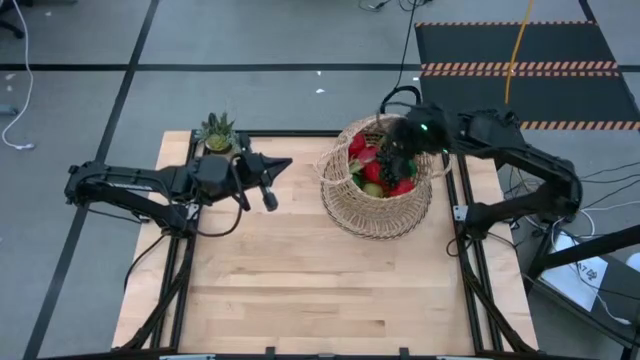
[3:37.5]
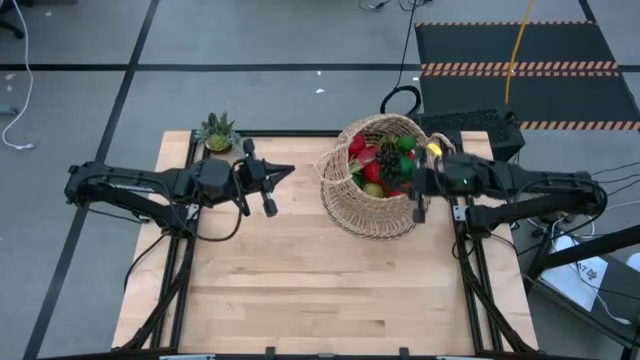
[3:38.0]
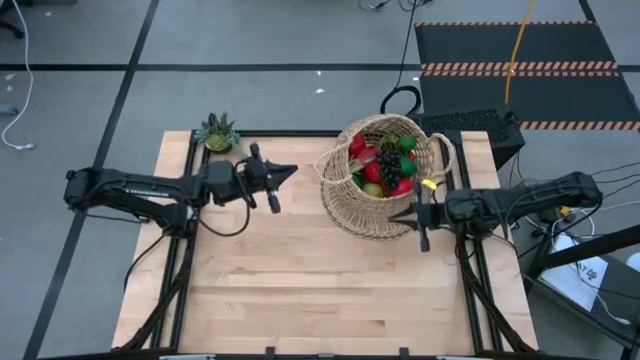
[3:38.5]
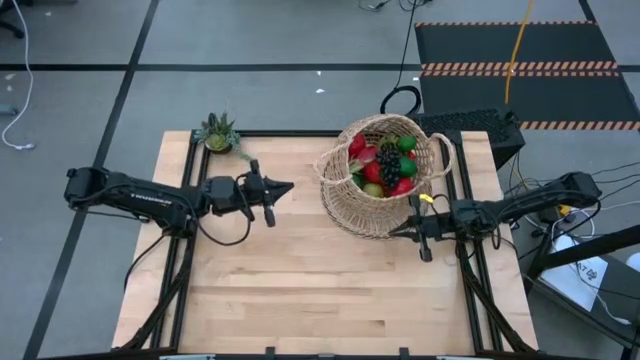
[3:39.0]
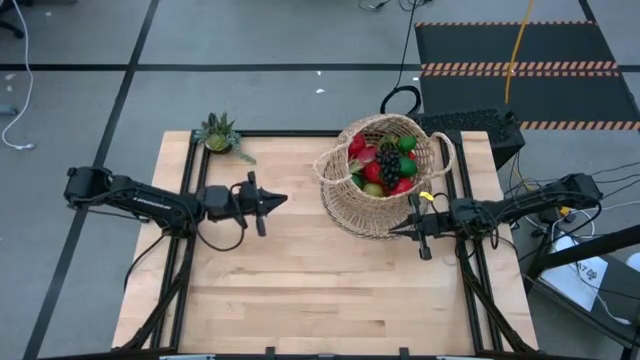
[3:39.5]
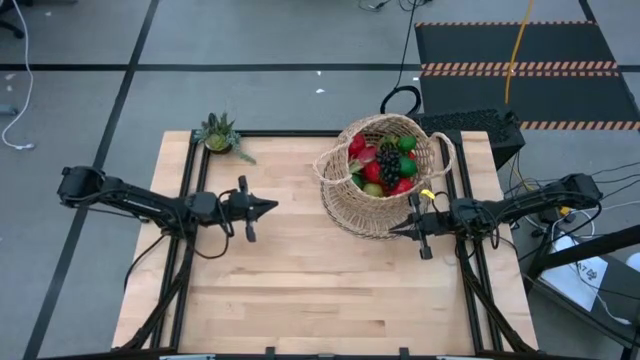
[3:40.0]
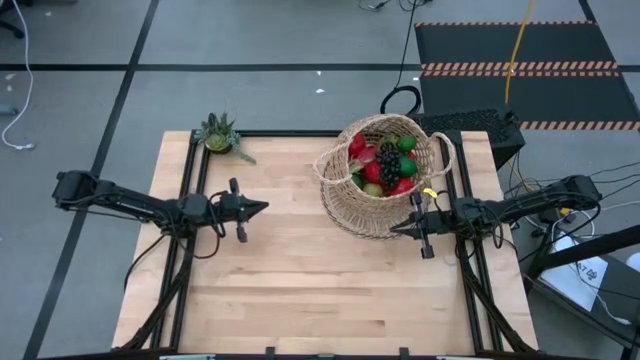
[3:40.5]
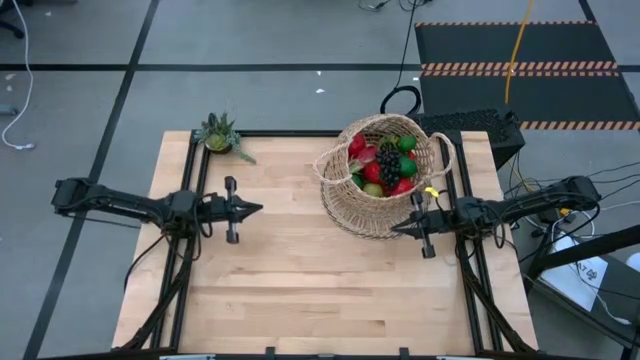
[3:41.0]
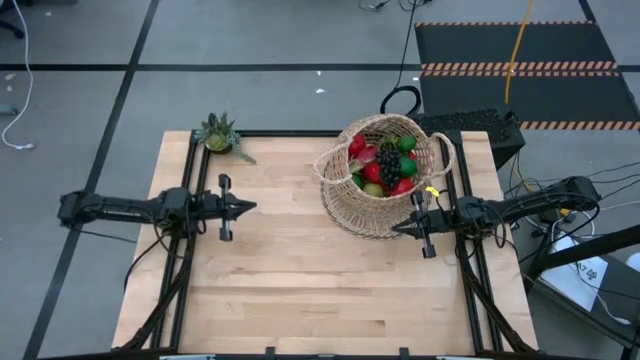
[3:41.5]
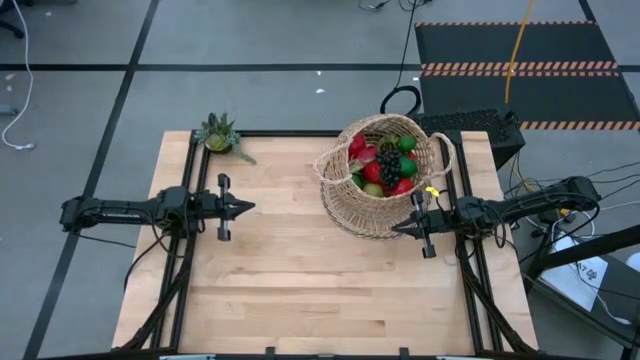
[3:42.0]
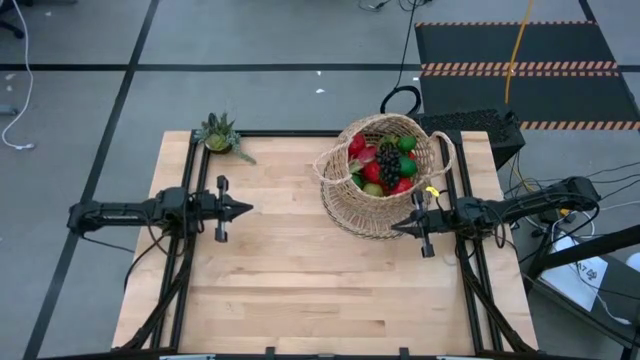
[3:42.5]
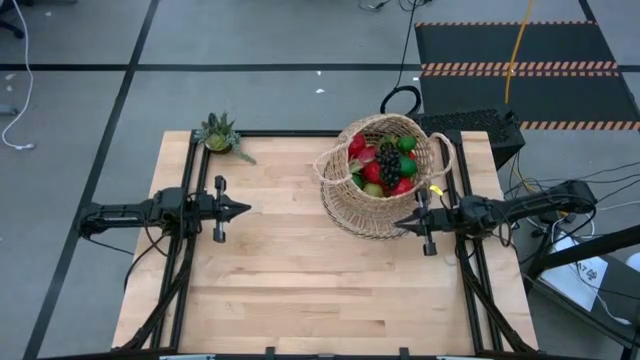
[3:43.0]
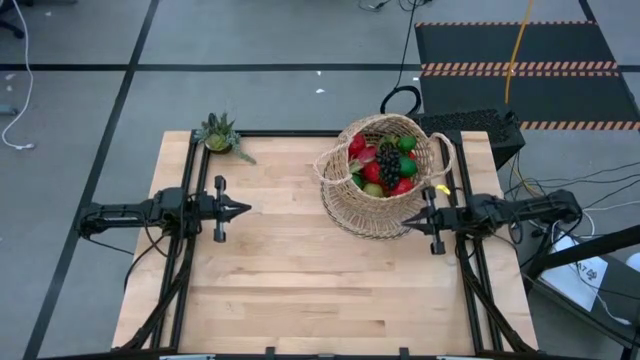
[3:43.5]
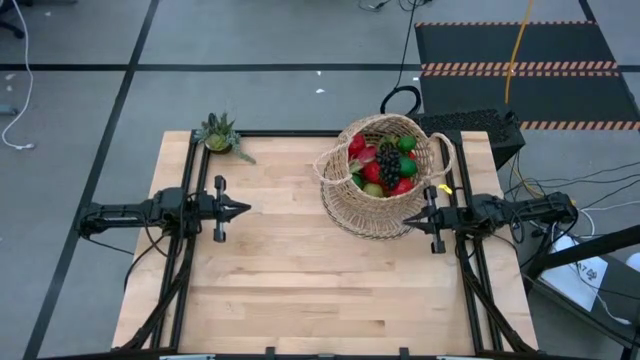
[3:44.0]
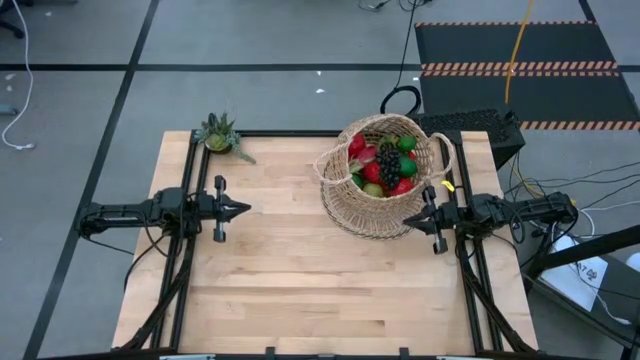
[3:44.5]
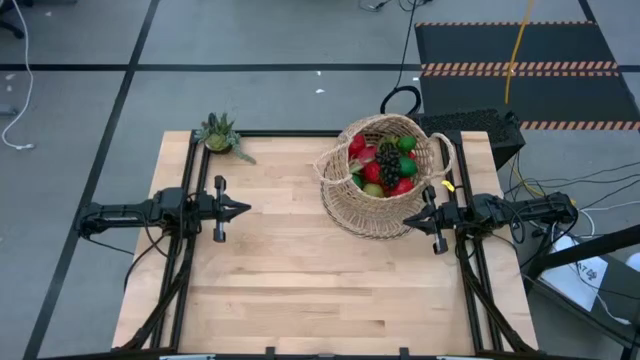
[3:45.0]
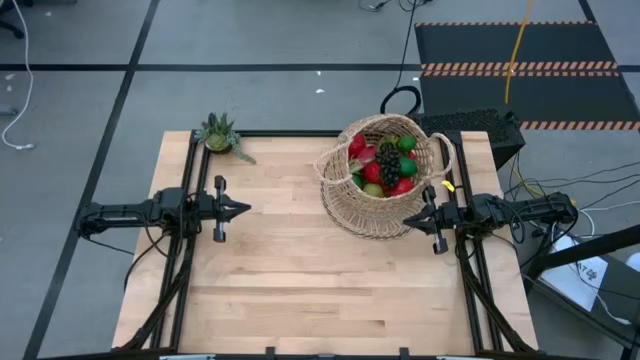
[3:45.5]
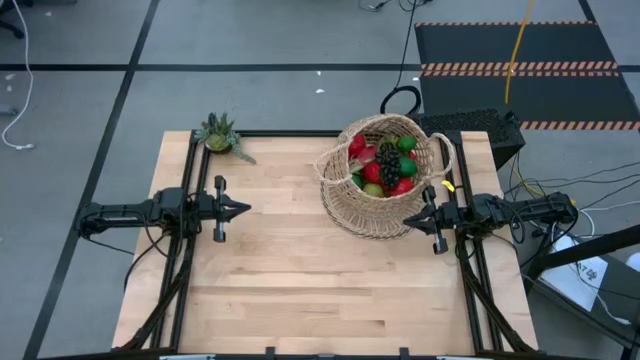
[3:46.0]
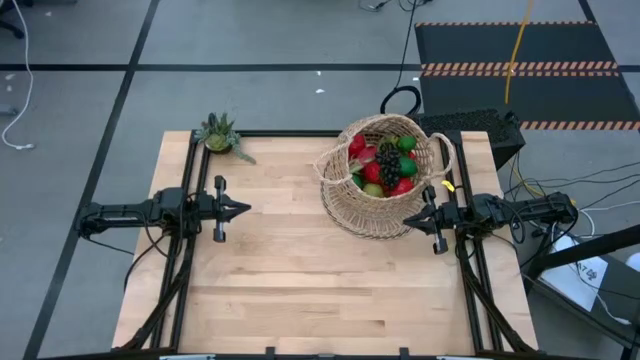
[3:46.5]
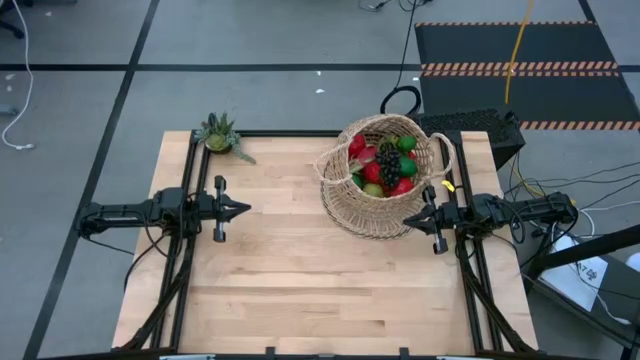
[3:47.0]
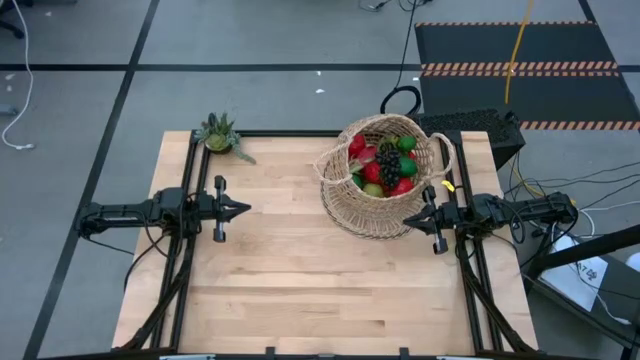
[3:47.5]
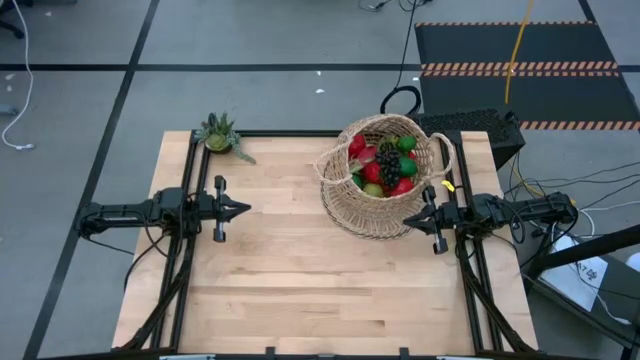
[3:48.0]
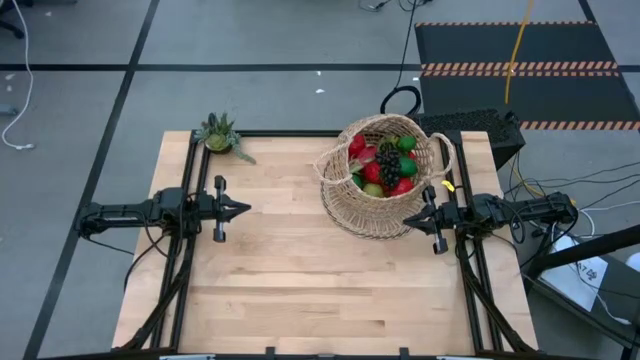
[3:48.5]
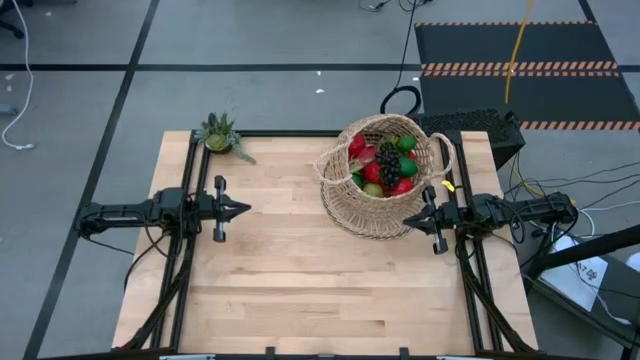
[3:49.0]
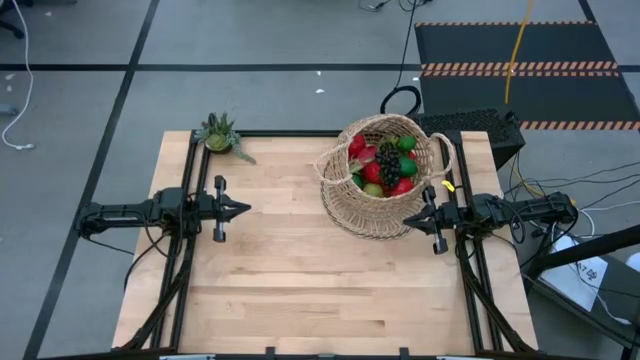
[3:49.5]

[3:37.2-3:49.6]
Task: Build produce basket
Return to Home Position

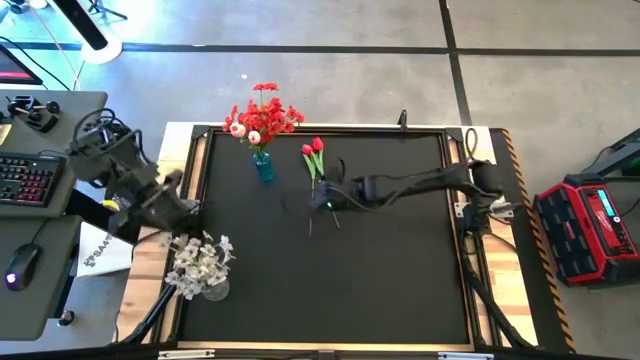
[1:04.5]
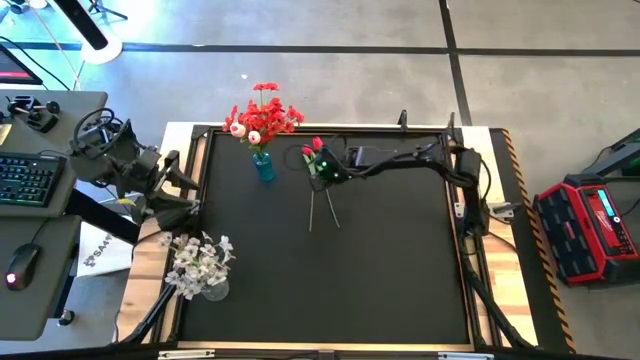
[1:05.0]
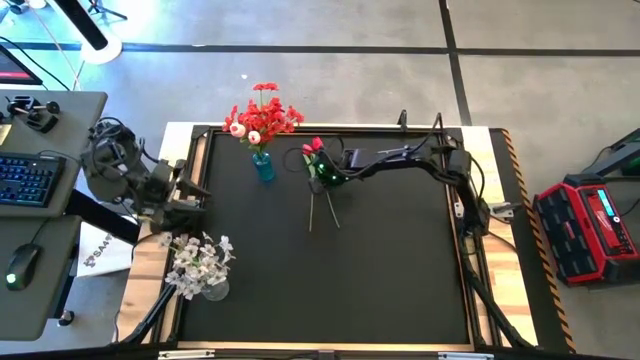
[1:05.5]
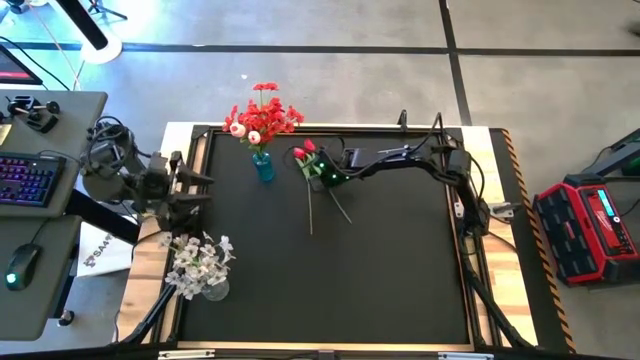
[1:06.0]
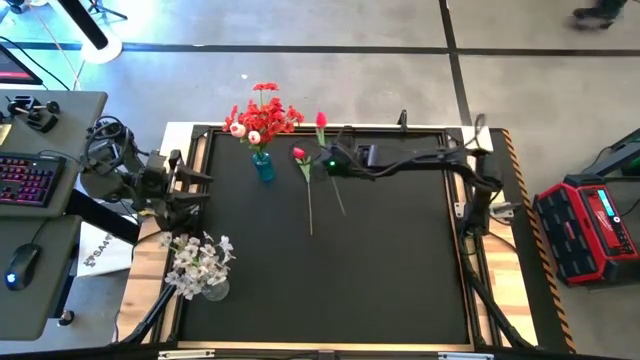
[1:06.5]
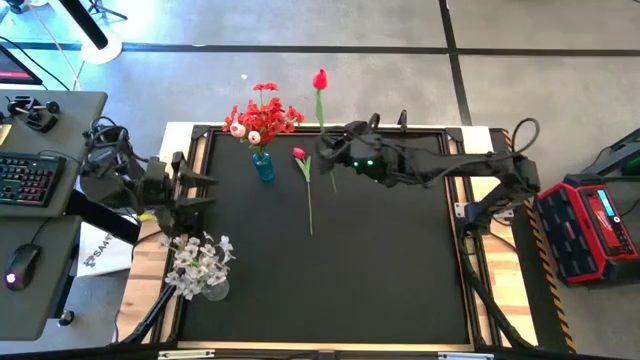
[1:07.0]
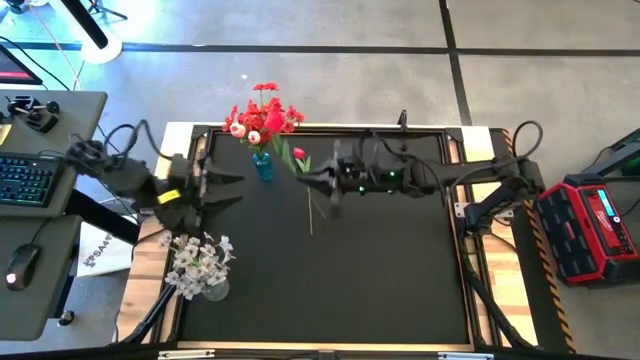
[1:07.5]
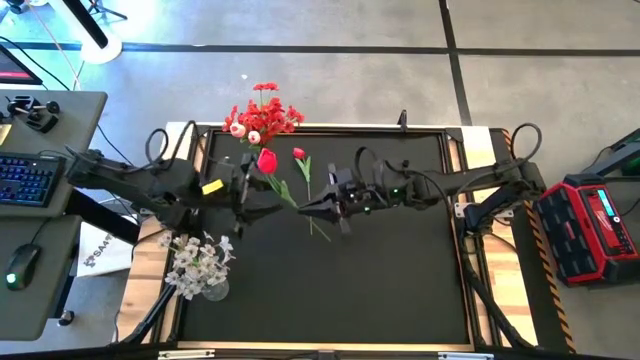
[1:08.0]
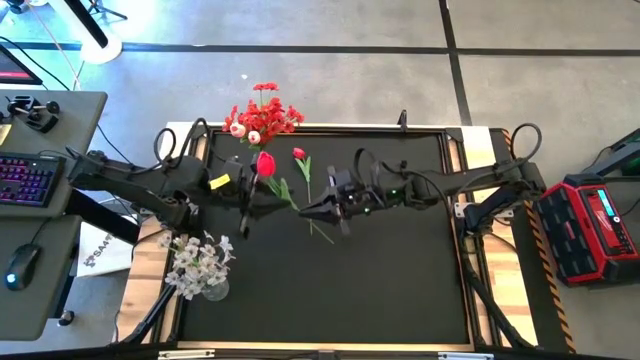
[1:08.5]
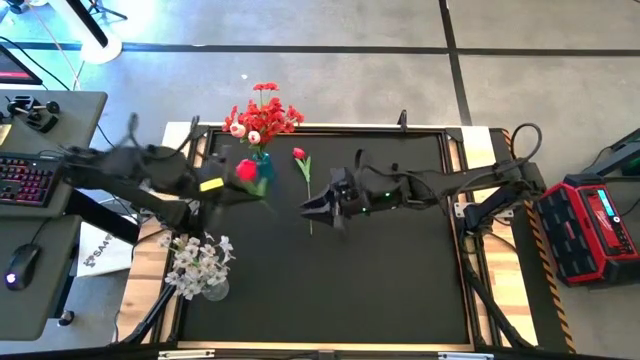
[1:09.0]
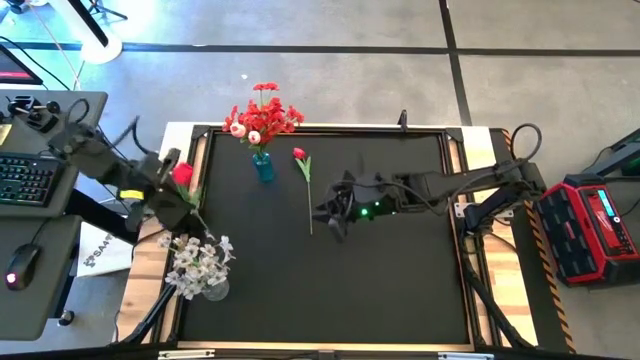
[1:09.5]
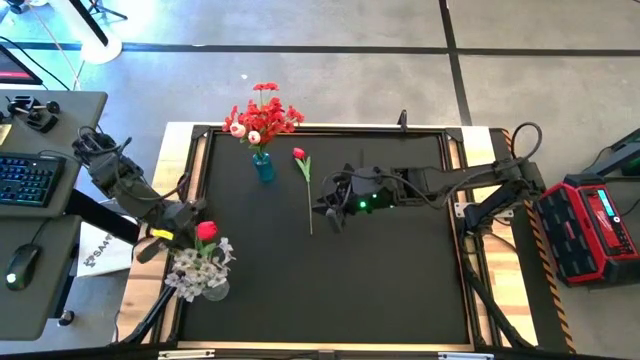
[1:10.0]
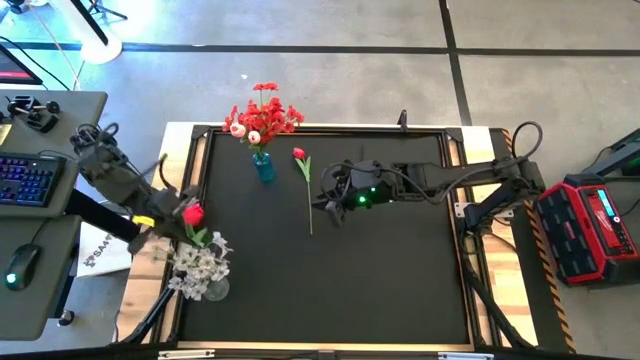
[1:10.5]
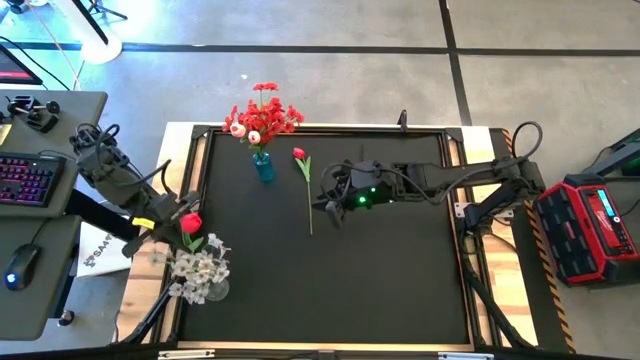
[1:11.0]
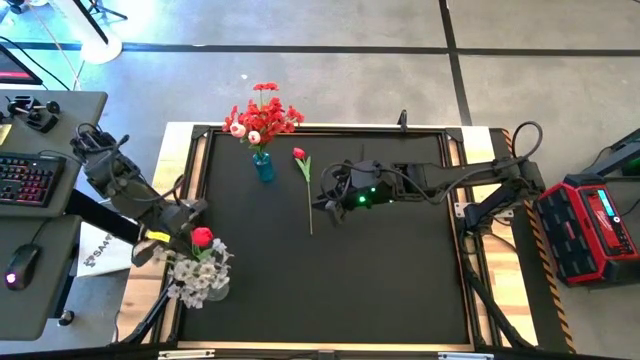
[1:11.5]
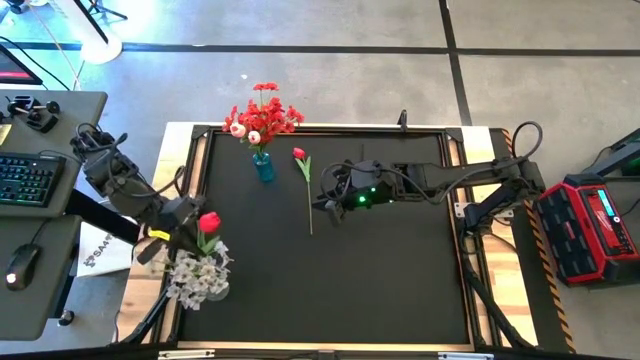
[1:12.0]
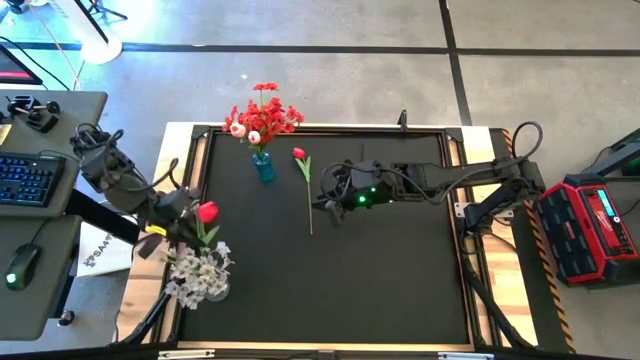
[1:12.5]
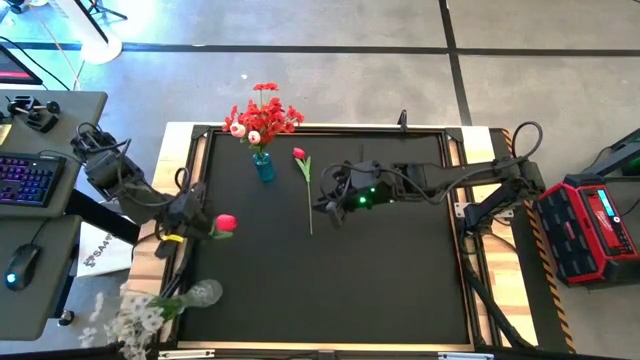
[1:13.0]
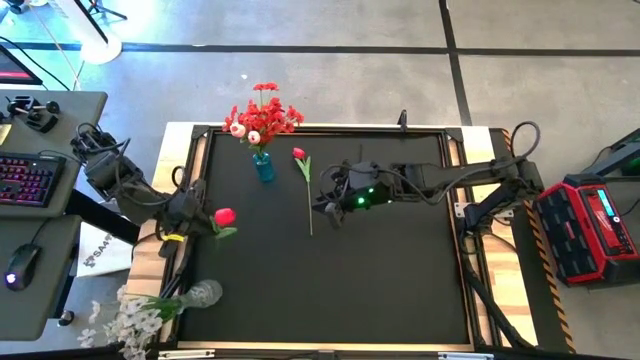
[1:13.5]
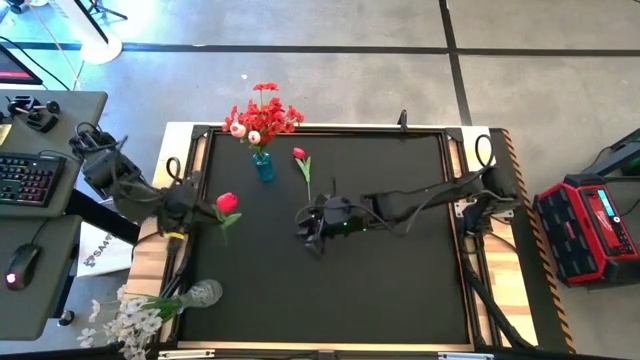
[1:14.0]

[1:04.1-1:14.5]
Task: Sort flowers into vase by color
Put the top right red flower into the transparent vase
